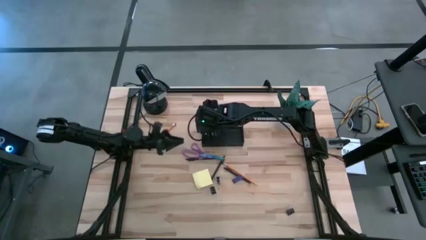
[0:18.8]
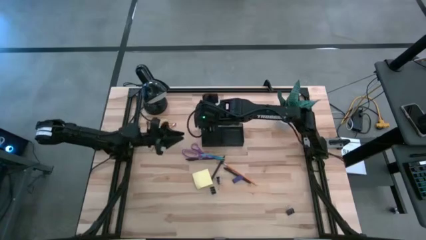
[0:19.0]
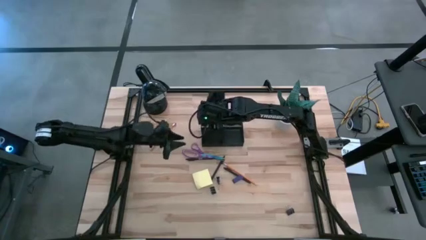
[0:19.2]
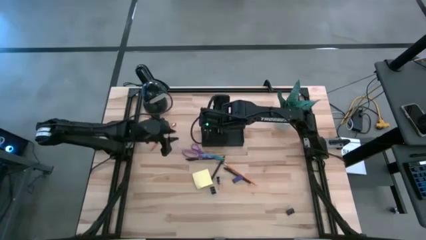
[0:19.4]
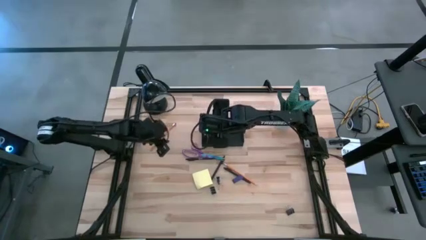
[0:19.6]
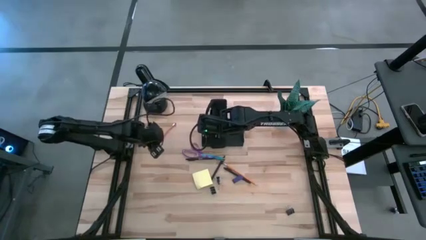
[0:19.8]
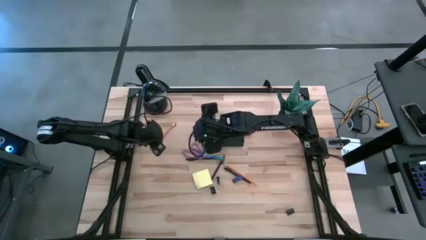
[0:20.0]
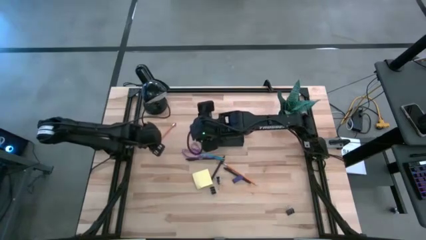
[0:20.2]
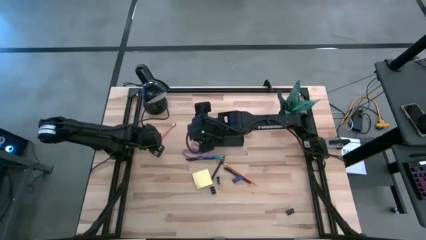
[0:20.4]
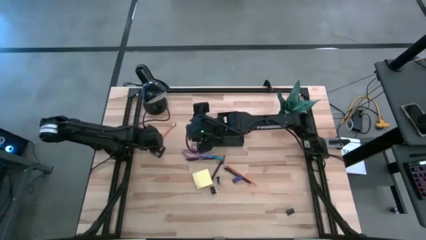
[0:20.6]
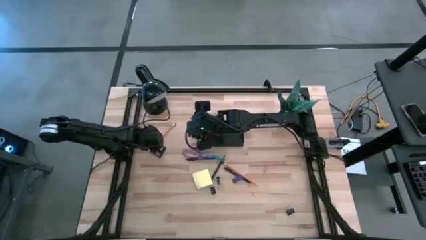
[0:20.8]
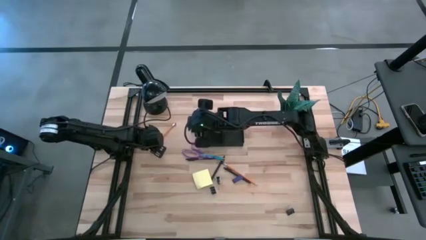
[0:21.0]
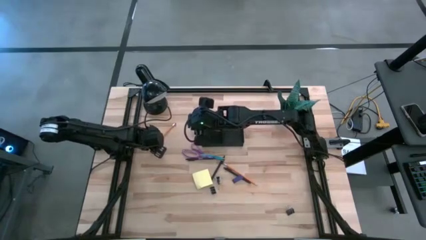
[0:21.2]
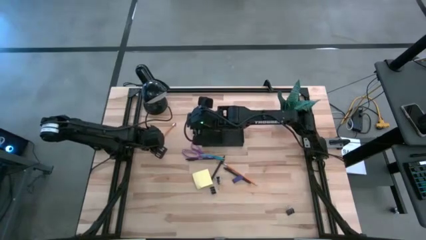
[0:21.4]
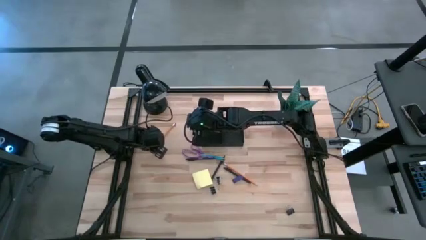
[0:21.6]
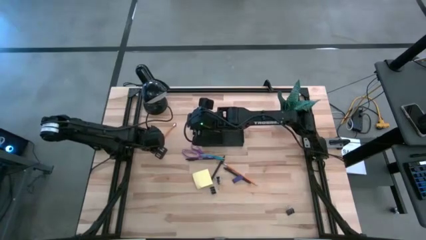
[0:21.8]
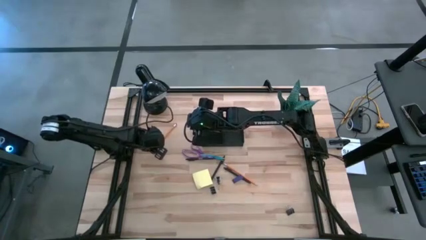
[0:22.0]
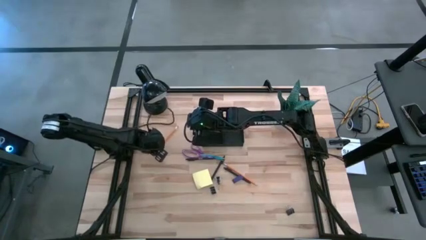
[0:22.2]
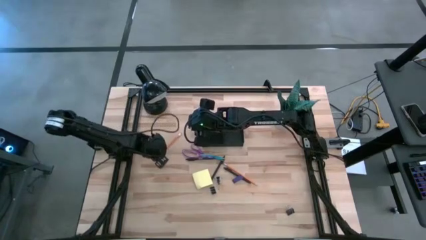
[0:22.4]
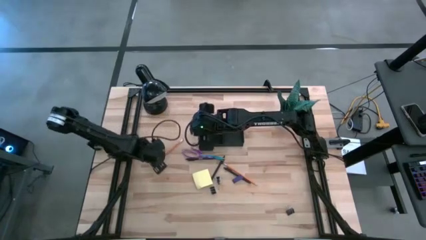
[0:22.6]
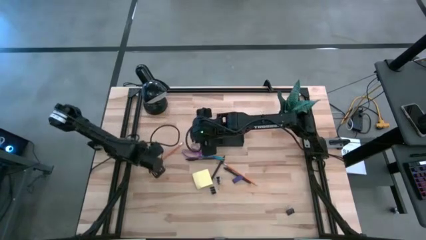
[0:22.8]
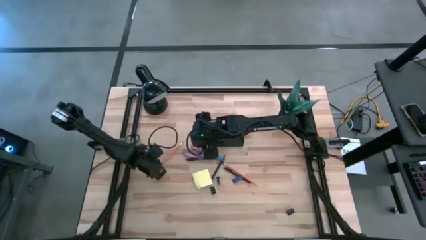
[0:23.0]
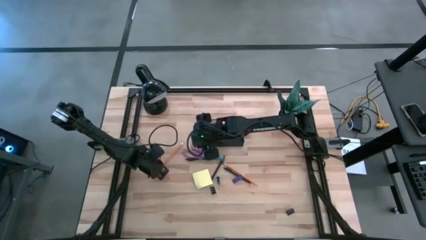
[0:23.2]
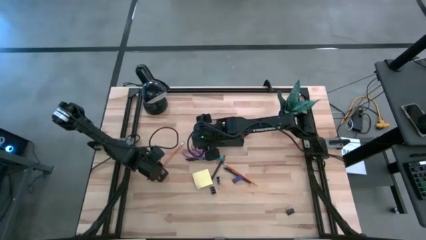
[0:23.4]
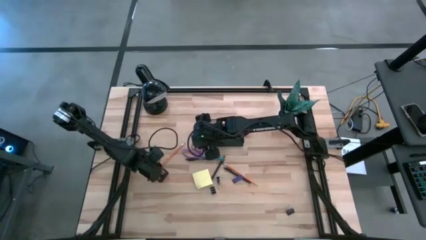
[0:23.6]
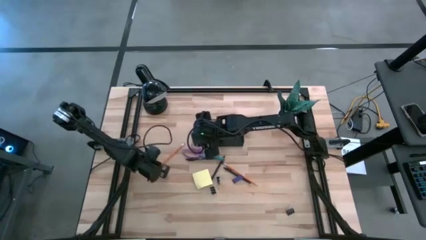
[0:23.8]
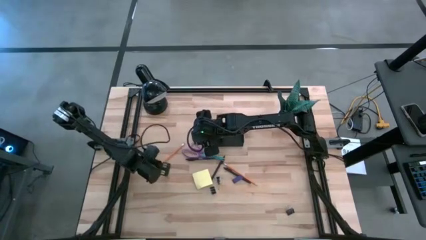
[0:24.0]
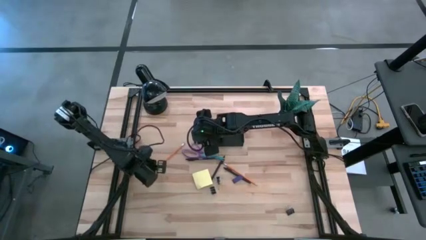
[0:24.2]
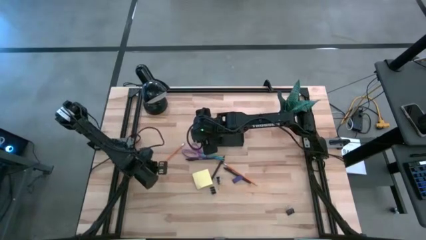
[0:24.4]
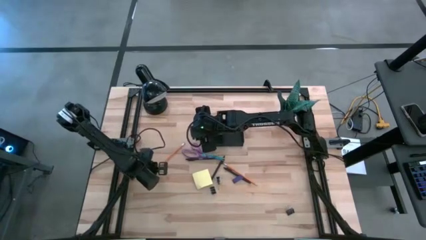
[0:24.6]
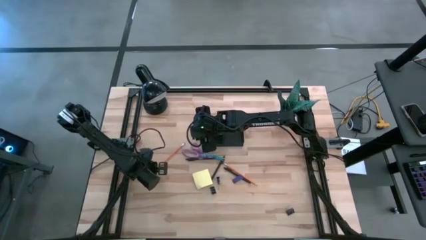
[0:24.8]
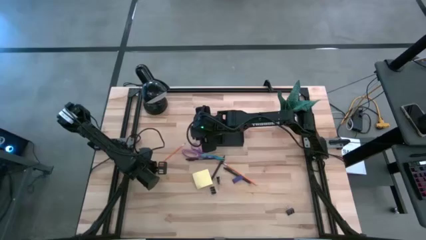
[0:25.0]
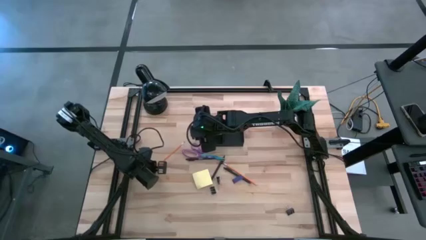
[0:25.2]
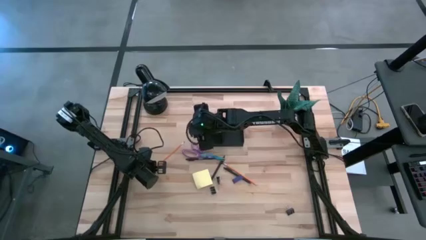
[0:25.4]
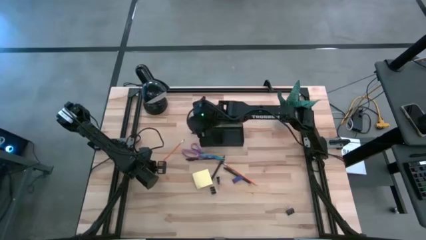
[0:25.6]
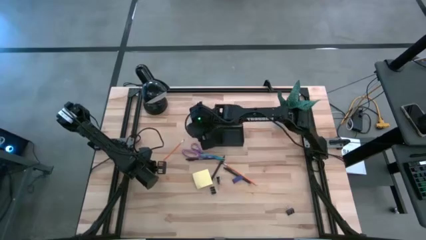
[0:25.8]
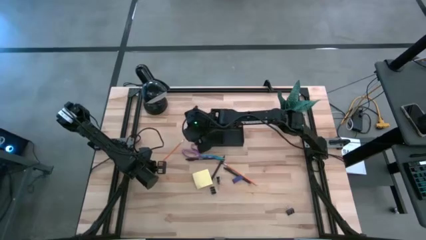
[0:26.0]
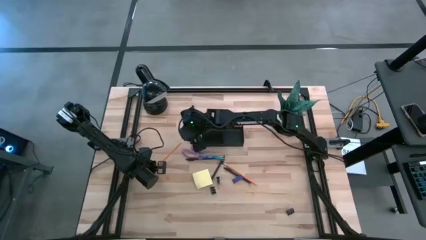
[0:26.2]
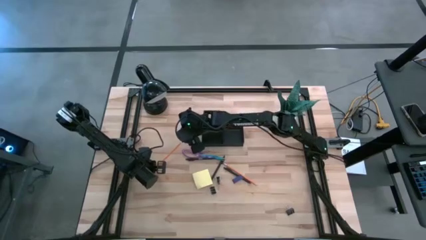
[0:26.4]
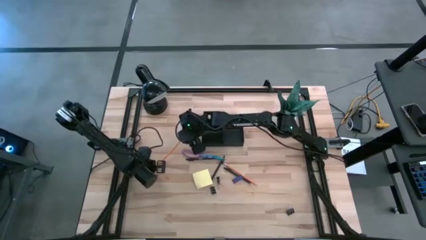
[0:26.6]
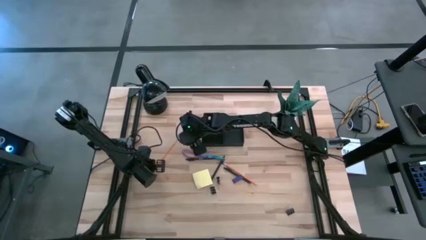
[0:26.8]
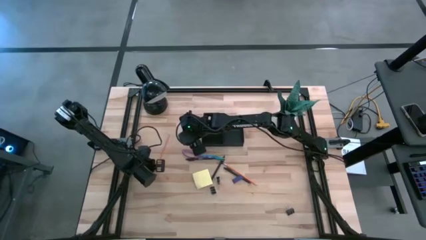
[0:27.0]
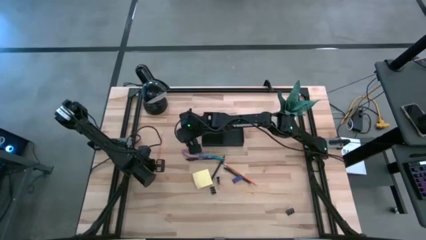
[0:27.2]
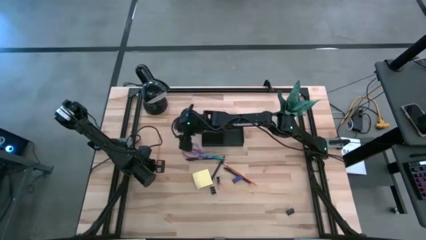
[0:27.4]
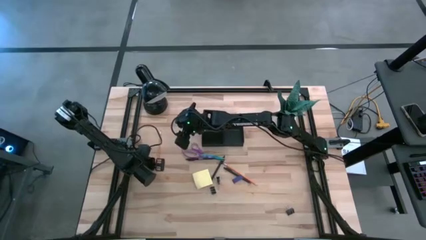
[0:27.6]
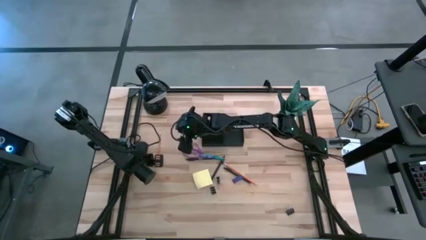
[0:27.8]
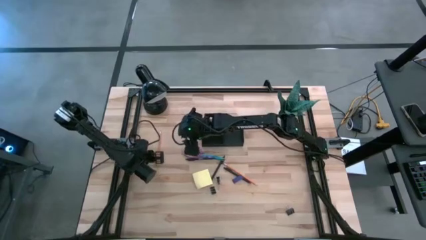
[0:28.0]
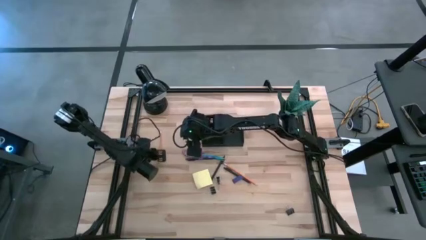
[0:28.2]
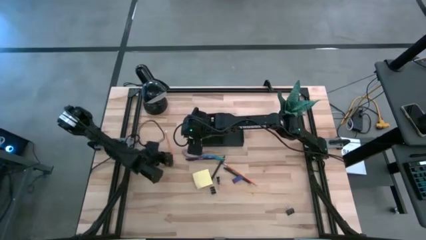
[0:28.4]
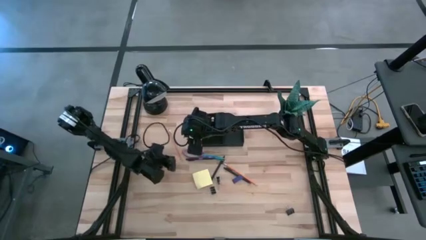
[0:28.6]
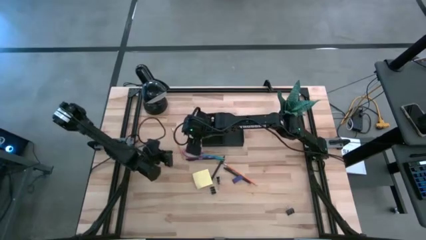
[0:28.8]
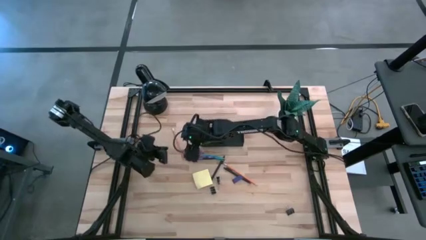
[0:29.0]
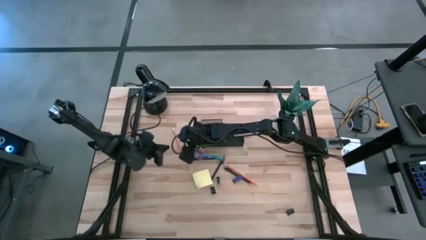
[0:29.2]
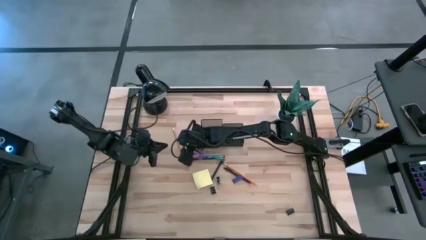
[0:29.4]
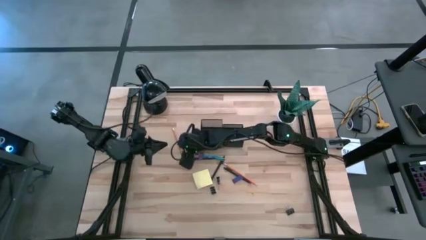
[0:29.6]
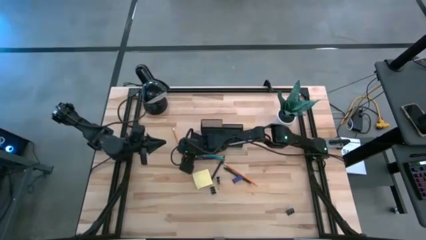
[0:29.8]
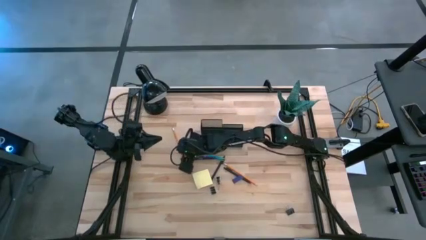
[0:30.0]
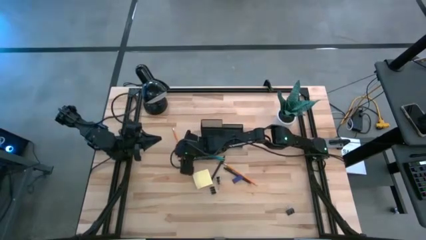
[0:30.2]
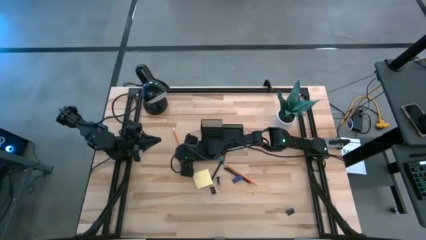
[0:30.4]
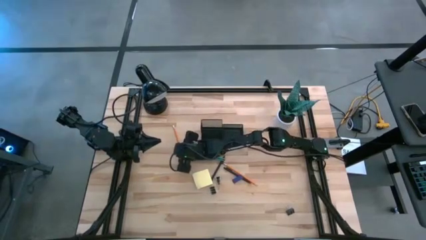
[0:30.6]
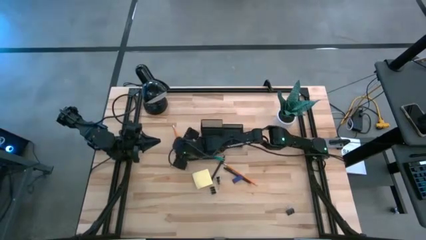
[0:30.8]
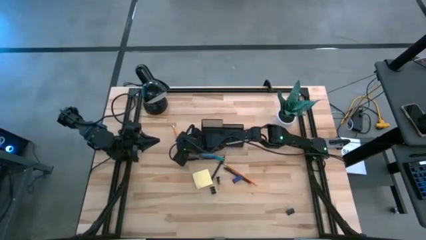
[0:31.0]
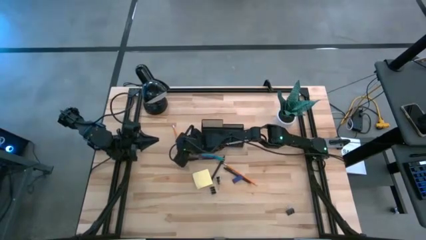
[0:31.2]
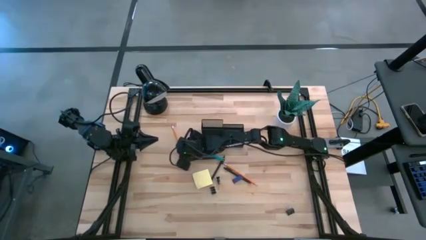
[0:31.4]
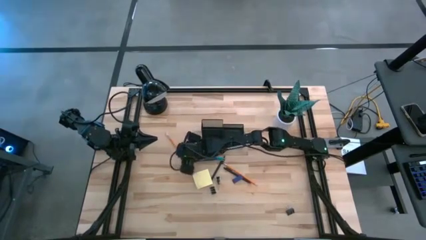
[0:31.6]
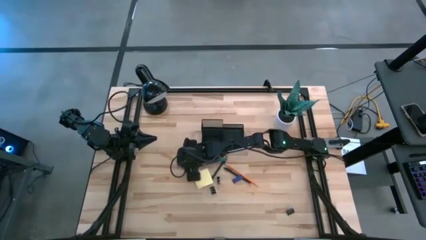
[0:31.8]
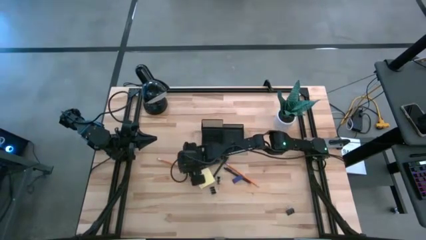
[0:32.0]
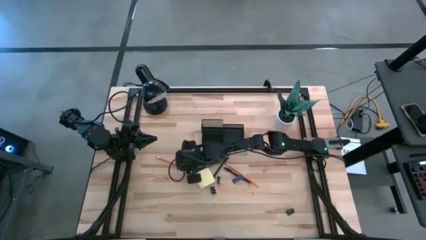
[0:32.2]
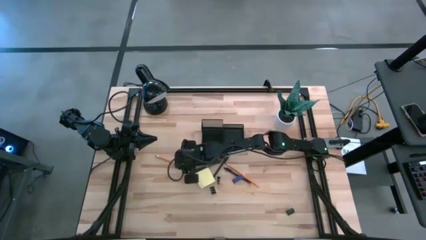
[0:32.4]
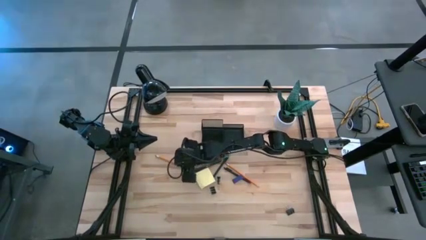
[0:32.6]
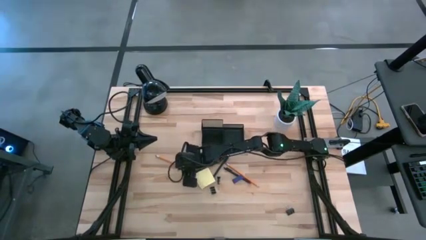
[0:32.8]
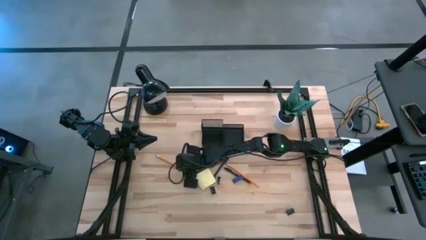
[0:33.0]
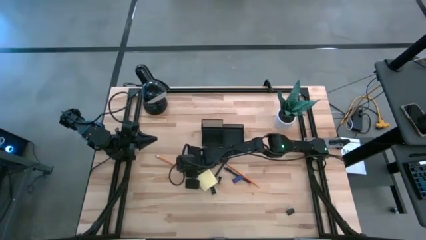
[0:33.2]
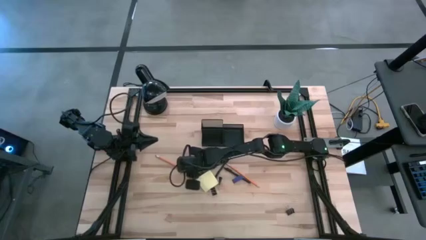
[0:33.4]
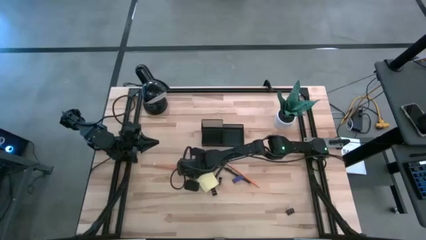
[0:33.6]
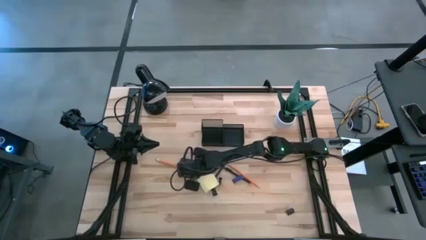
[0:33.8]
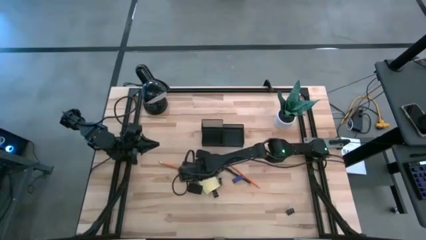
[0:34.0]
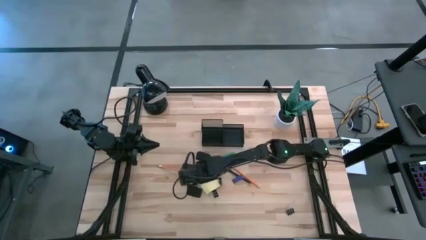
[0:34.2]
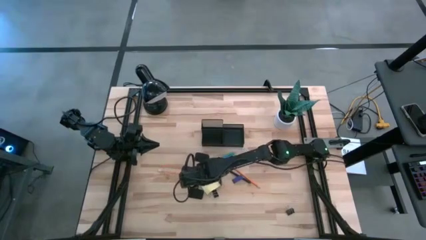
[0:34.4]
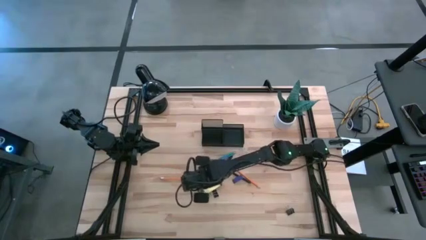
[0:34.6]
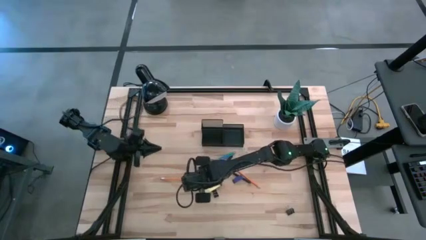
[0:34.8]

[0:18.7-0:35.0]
Task: Pick and place office supplies into organizer
Put the left orange pencil into the black desk organizer
